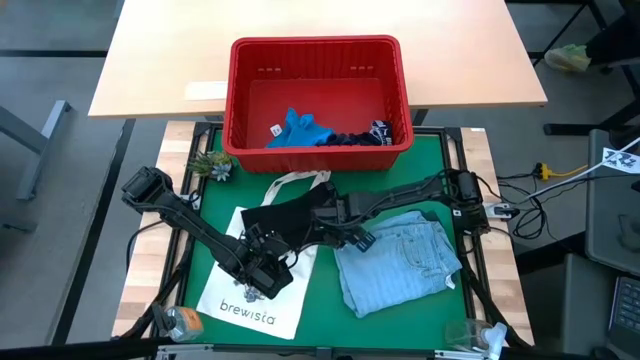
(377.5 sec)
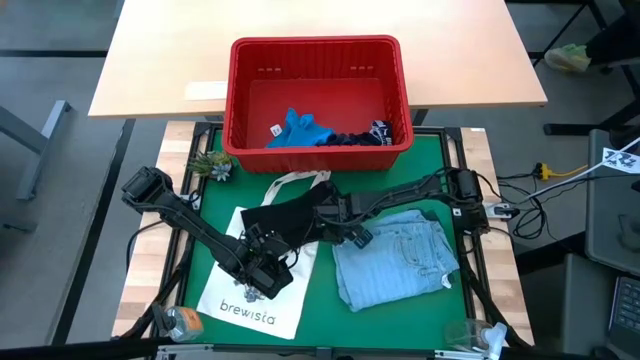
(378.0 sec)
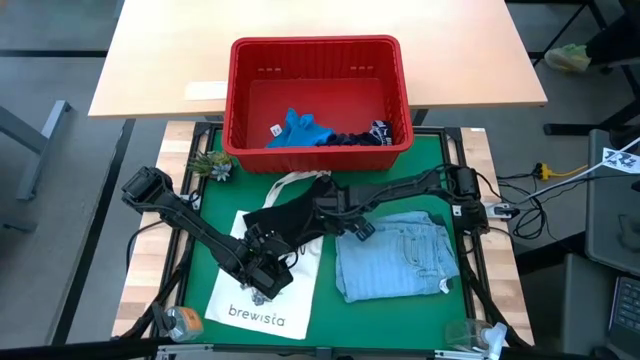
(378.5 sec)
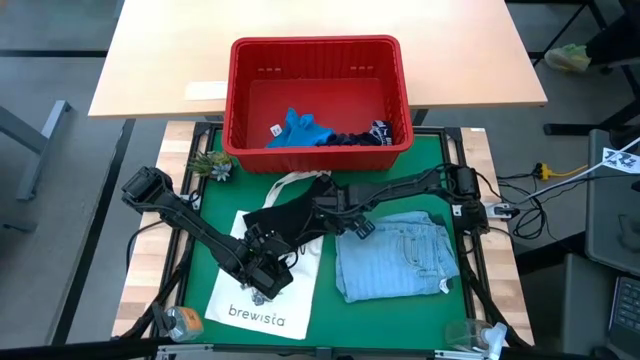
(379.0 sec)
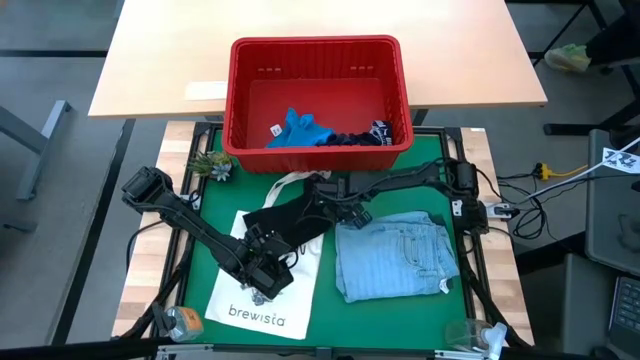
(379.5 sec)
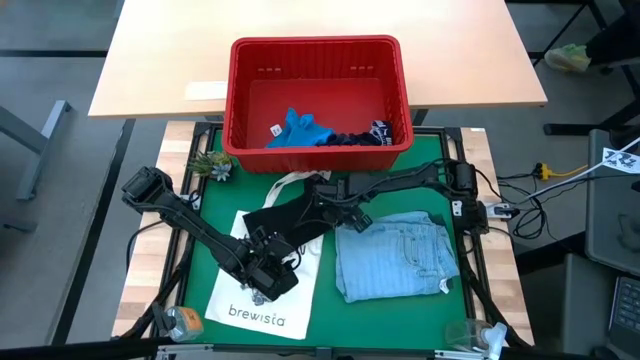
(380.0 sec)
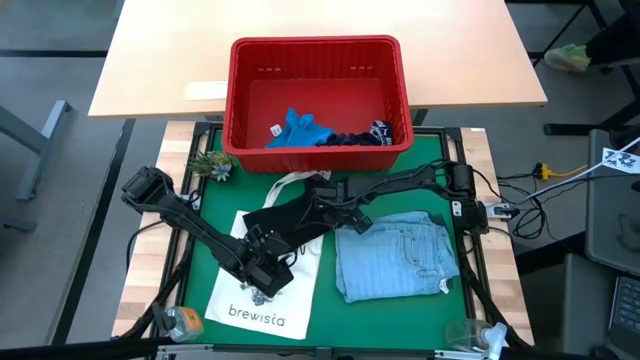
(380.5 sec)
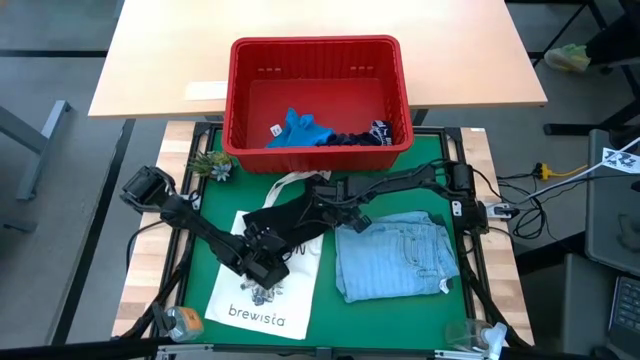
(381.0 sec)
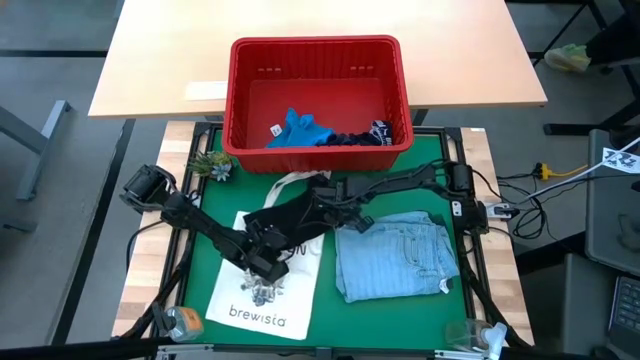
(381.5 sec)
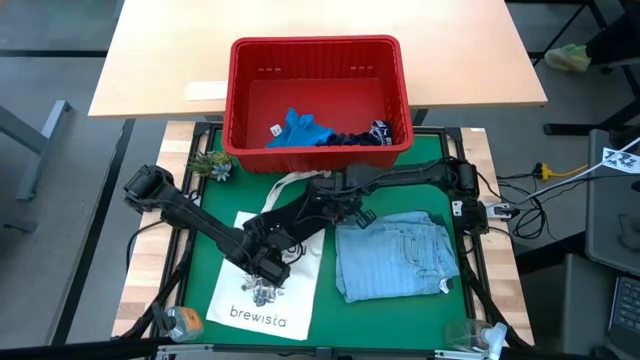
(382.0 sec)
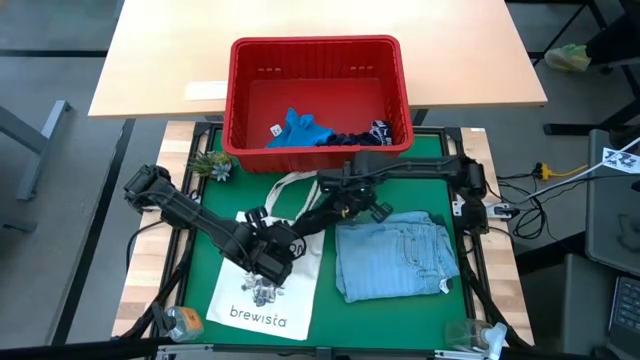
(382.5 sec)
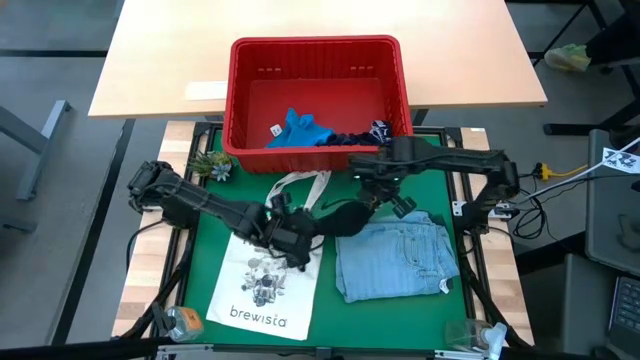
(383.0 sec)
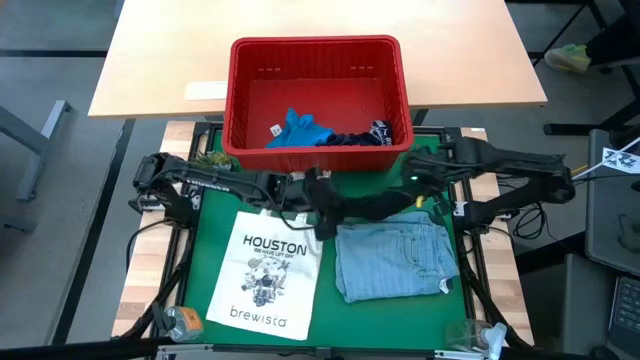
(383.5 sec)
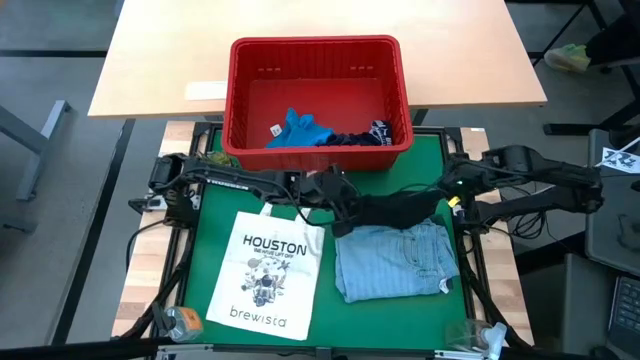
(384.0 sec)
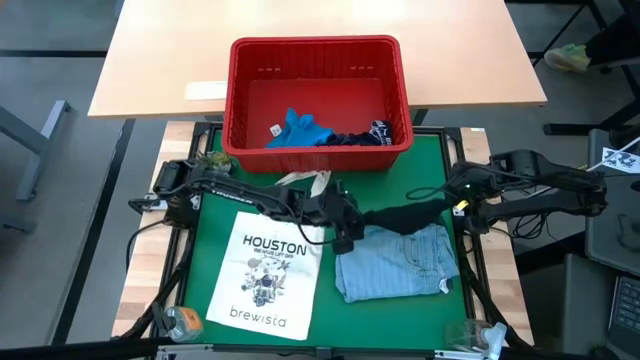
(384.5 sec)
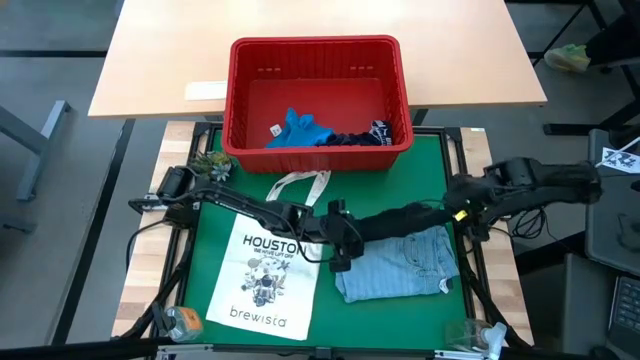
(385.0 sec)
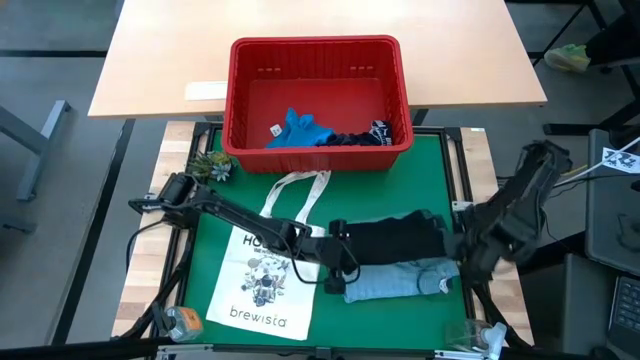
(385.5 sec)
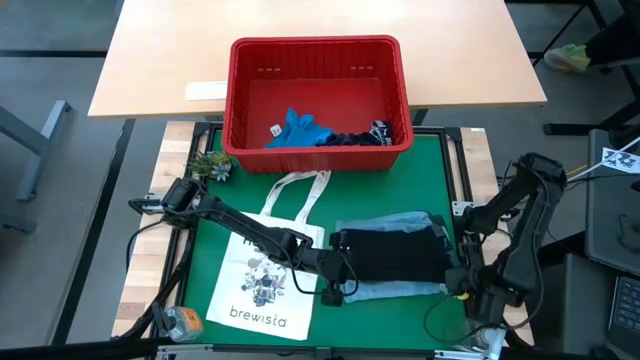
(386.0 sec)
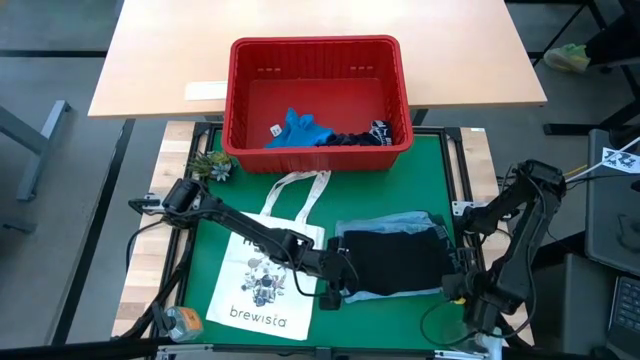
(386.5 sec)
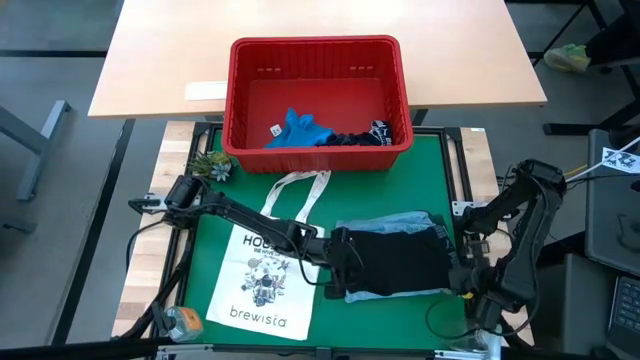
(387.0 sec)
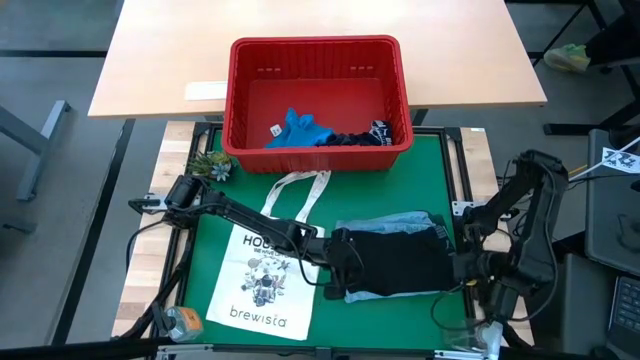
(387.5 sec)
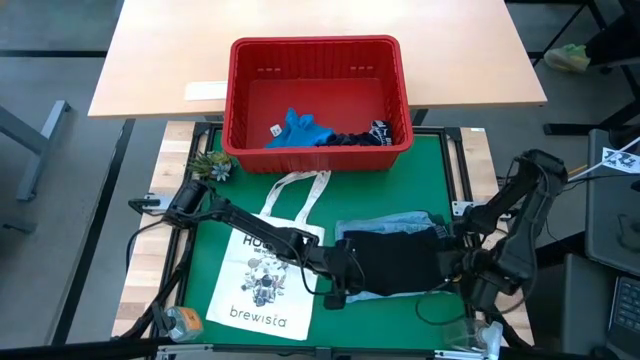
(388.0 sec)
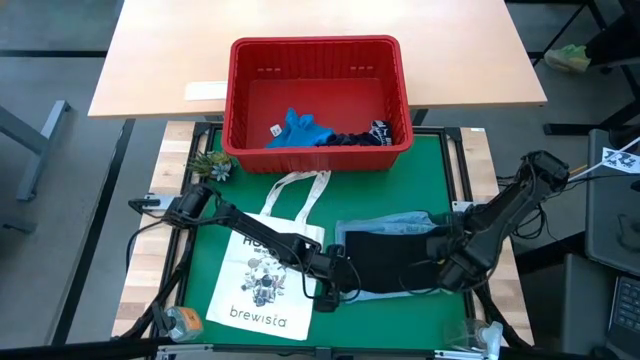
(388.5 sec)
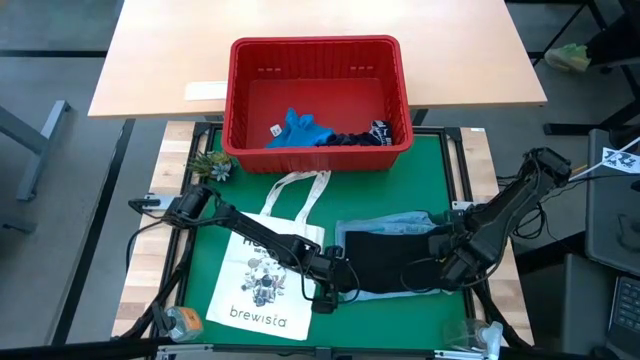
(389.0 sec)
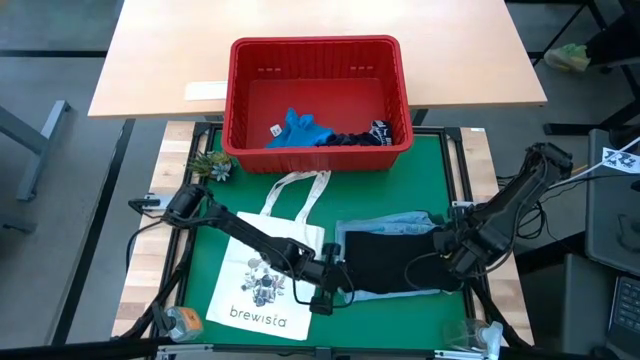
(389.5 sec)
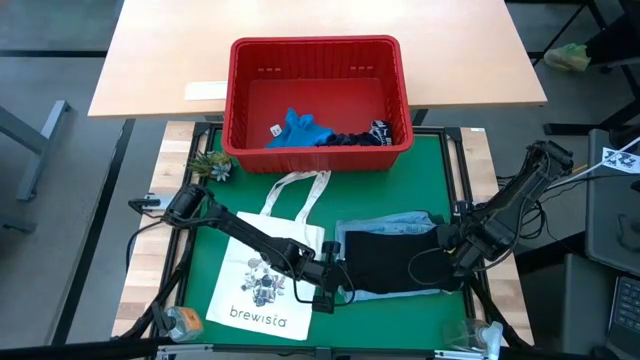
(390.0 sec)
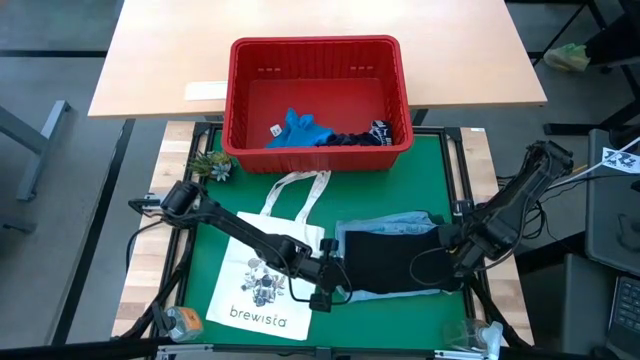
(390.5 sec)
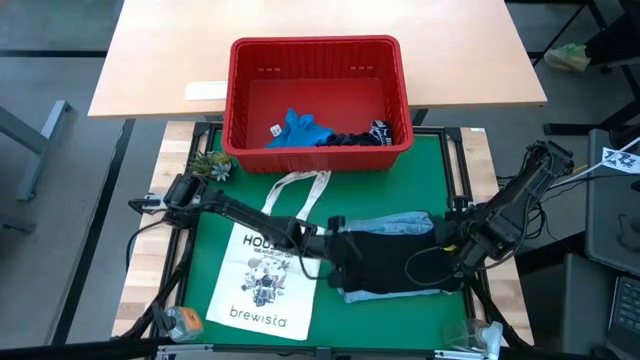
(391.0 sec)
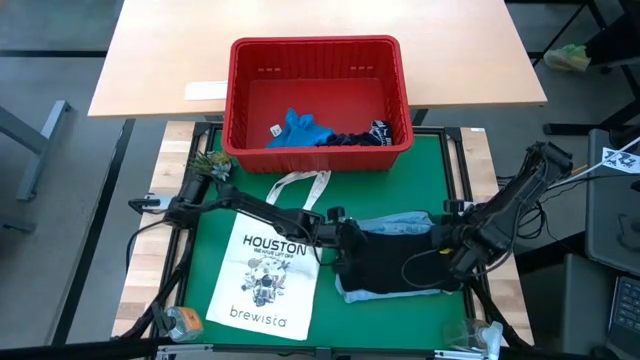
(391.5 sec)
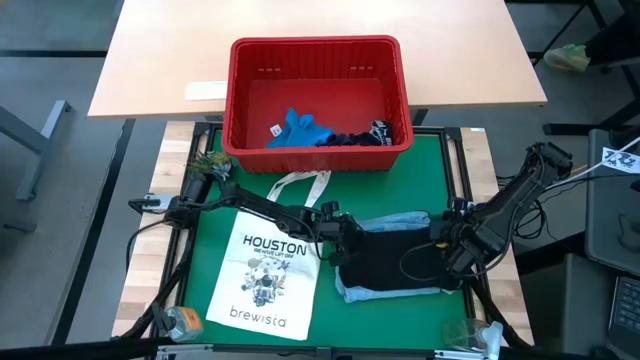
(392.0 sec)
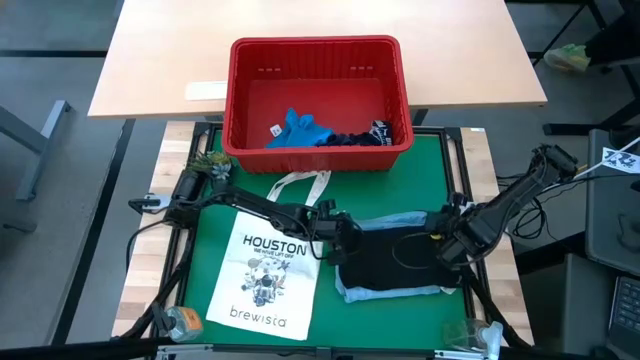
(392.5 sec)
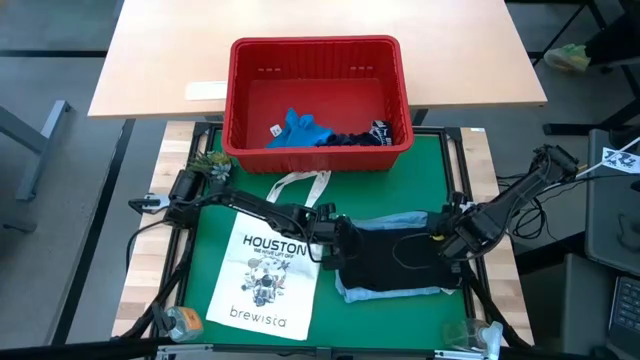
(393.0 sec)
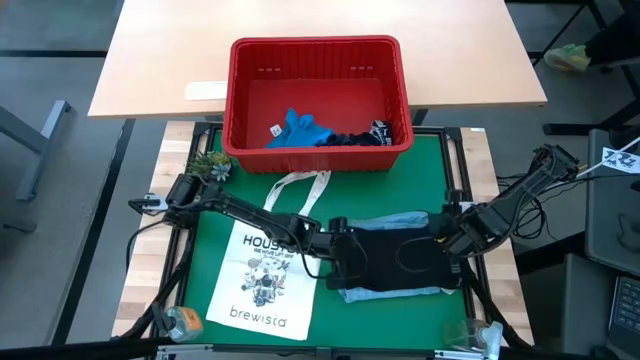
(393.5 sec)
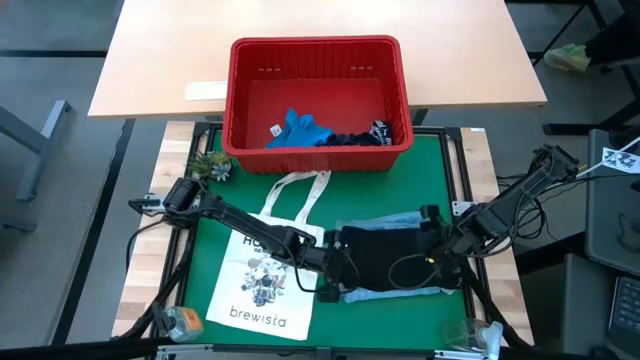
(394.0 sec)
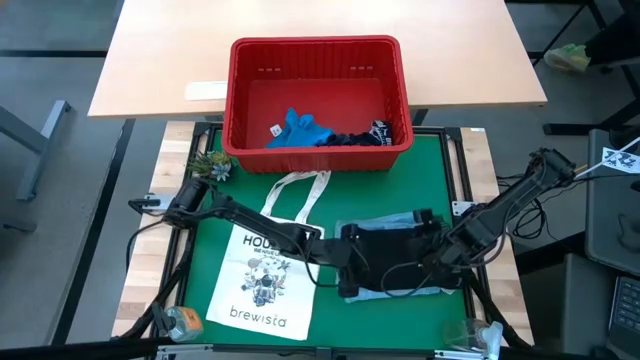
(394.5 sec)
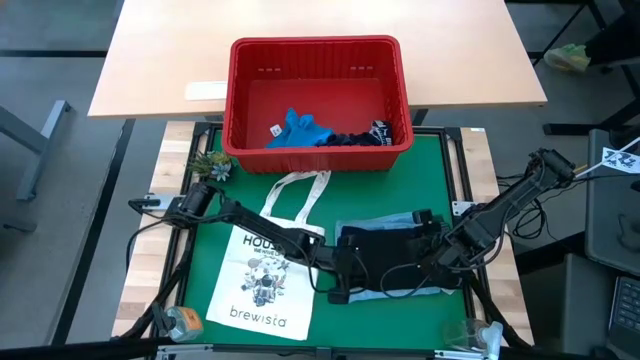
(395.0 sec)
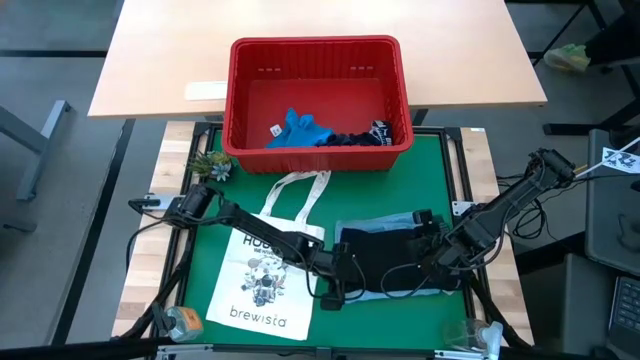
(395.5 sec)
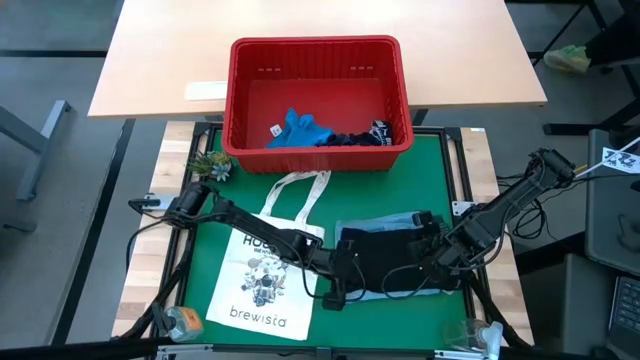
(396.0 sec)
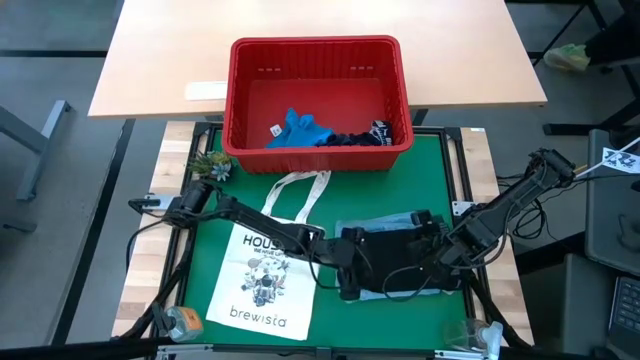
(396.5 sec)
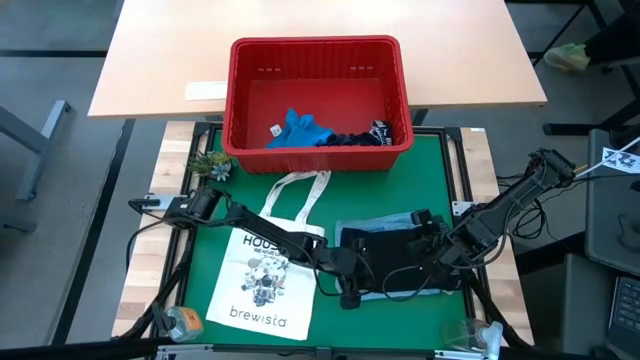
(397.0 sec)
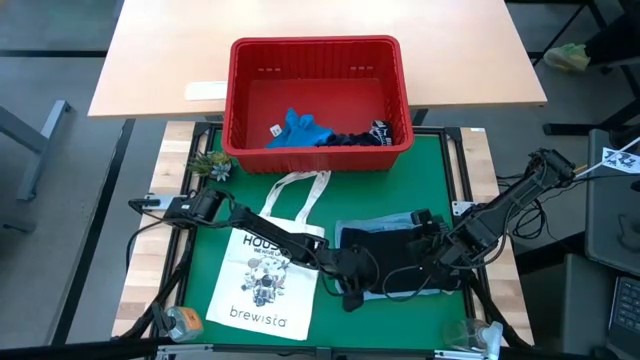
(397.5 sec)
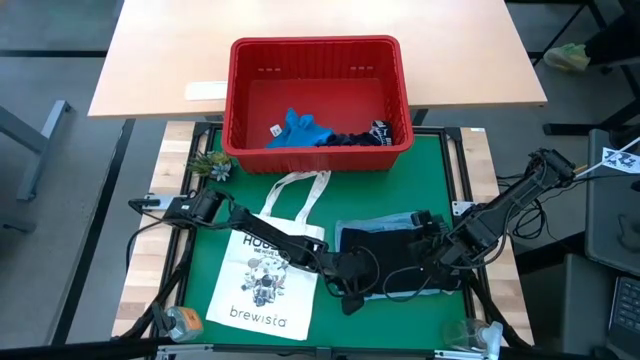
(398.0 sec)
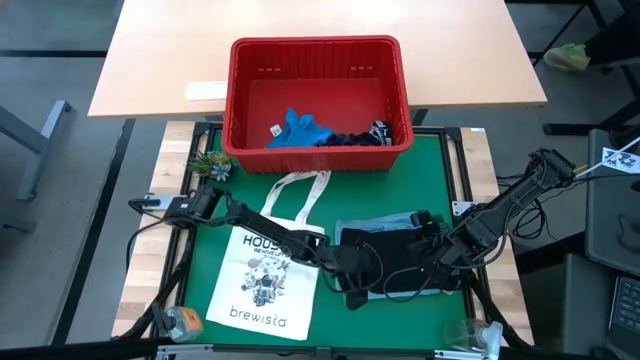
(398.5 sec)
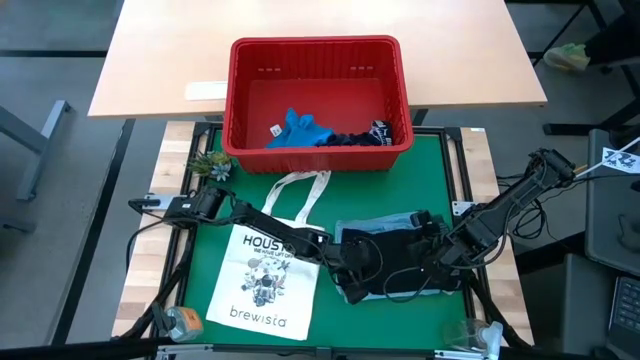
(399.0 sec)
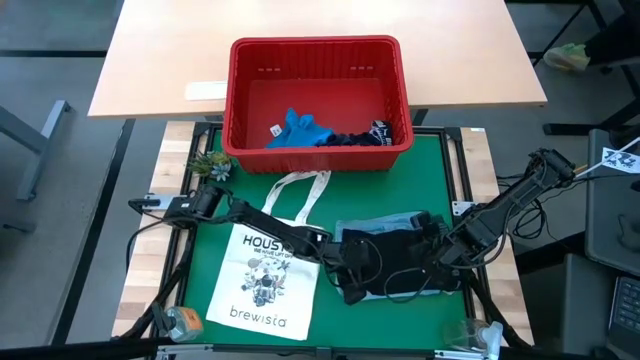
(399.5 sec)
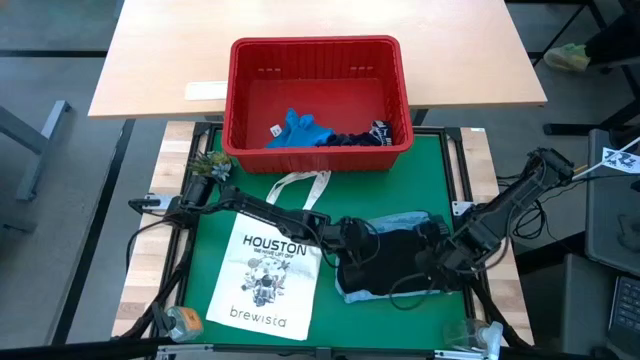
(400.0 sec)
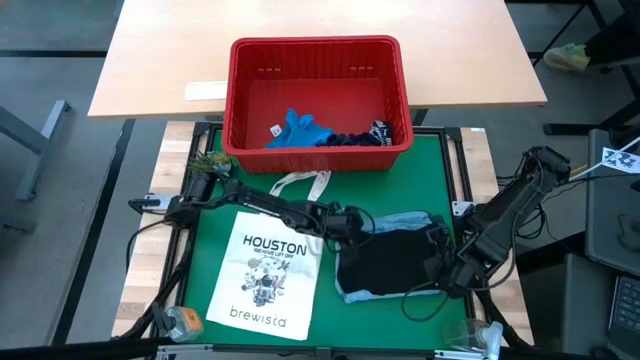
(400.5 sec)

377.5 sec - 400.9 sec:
Task: Fold Laundry from Bin
Stack the black boxer on top of the light blue jeans
